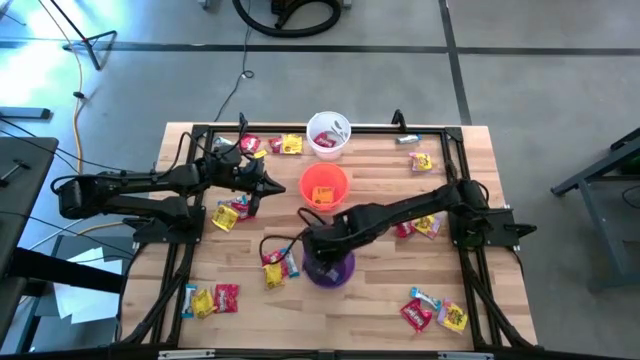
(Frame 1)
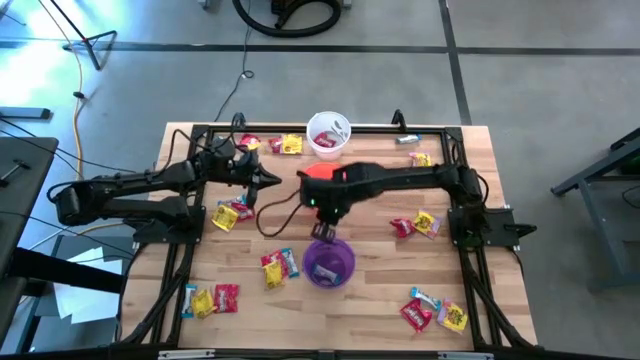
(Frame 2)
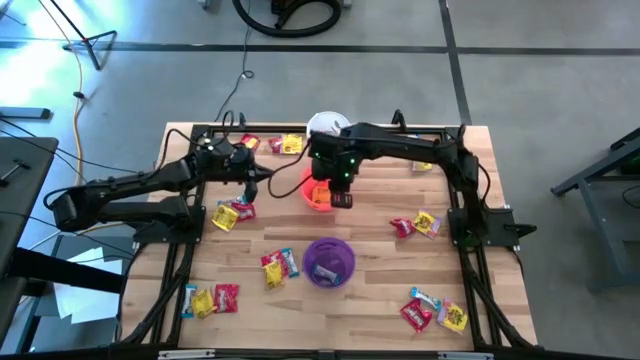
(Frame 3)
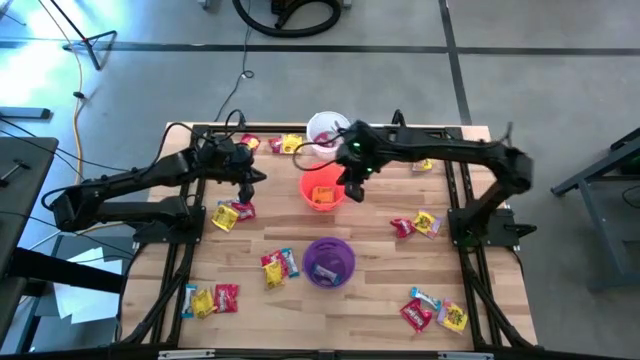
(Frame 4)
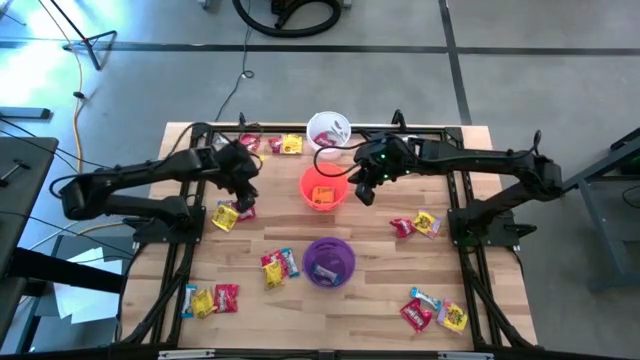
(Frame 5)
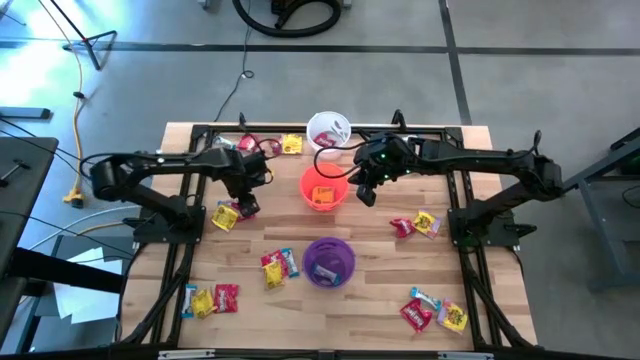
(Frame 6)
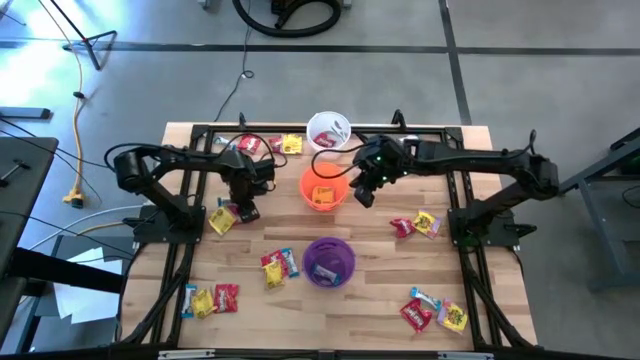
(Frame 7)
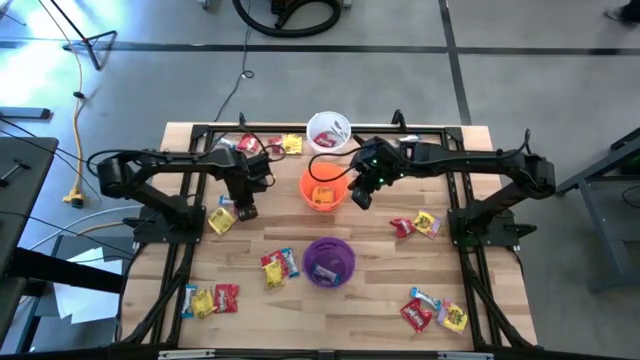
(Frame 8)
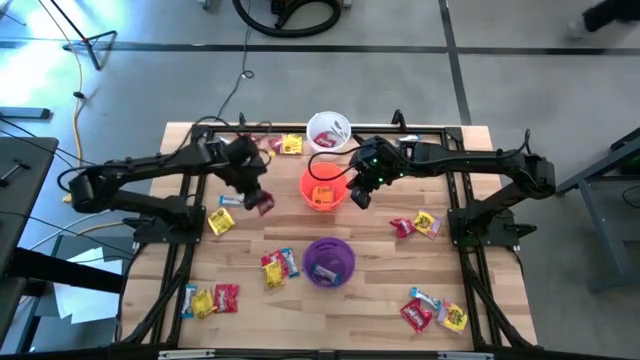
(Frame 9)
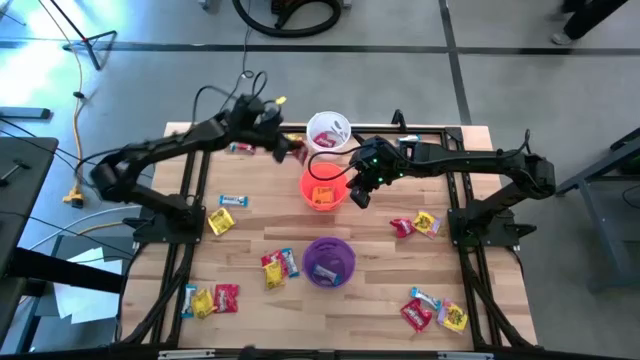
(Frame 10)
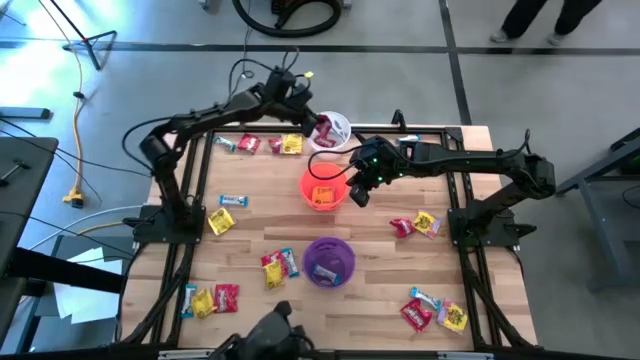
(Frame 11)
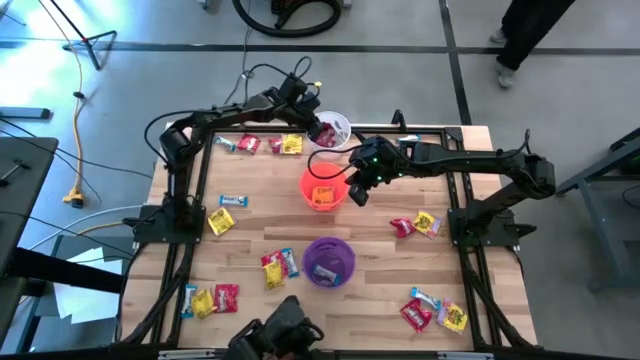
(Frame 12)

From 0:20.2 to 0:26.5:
Task: Sort candy
Put the red candy into the white bucket

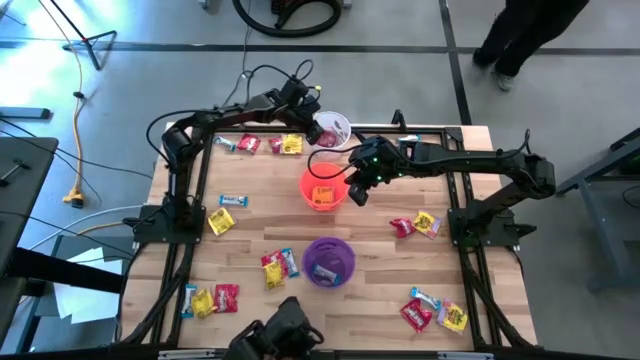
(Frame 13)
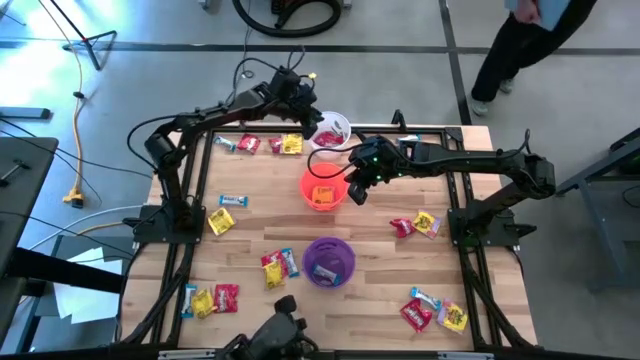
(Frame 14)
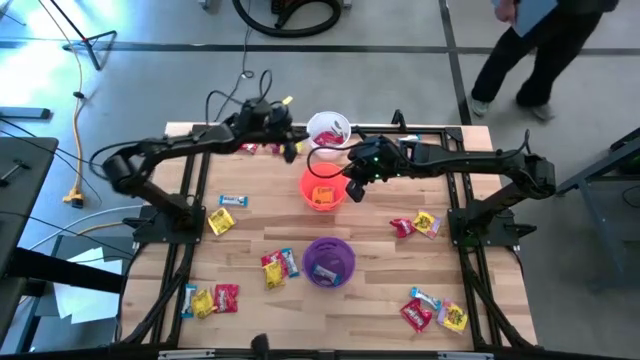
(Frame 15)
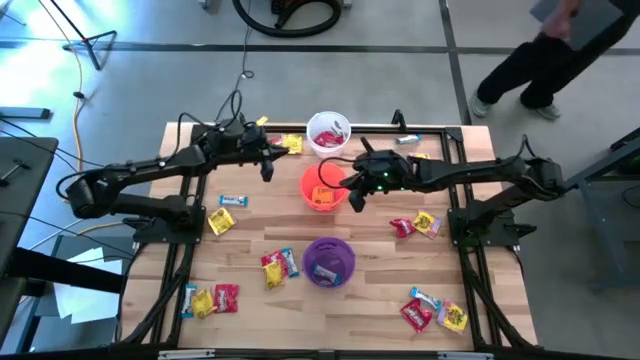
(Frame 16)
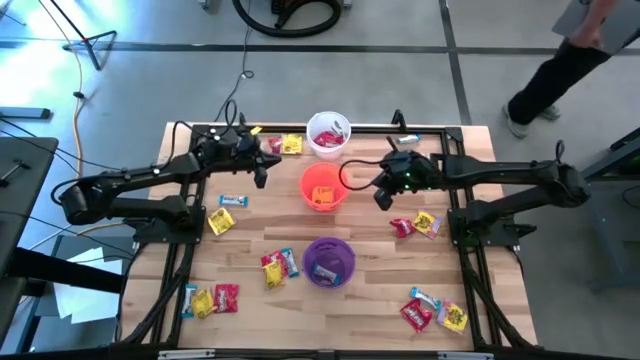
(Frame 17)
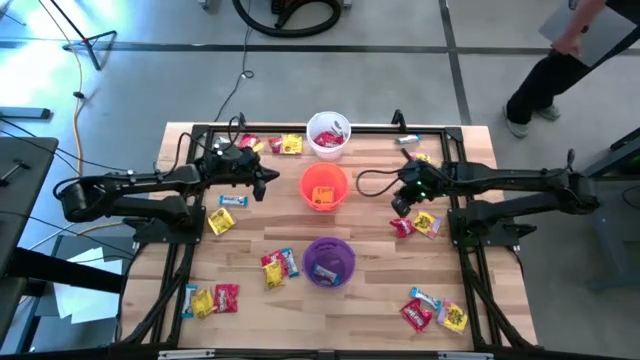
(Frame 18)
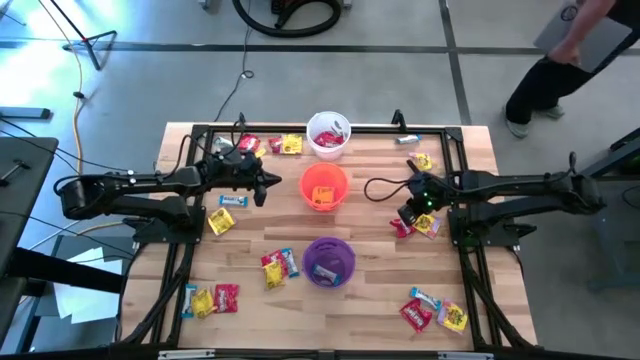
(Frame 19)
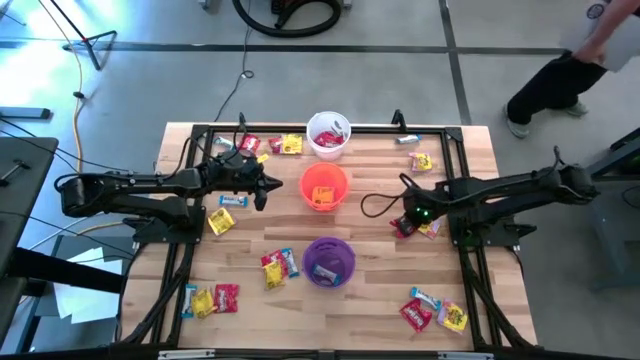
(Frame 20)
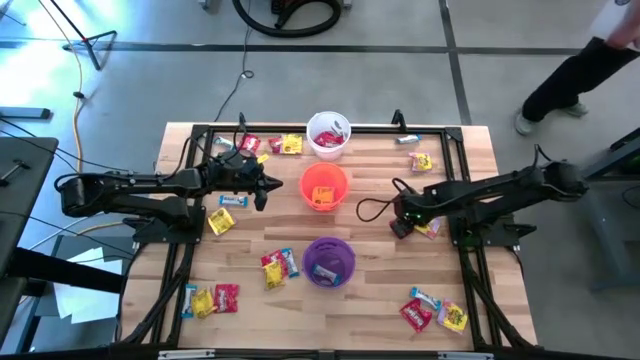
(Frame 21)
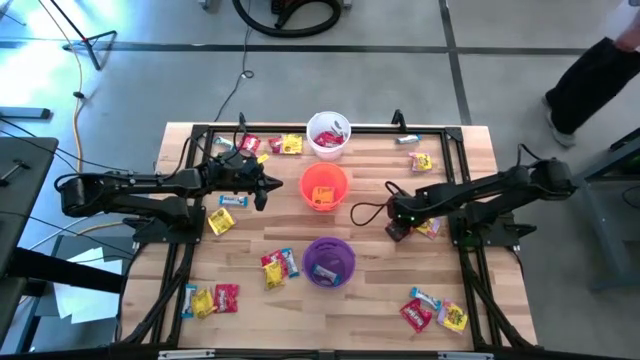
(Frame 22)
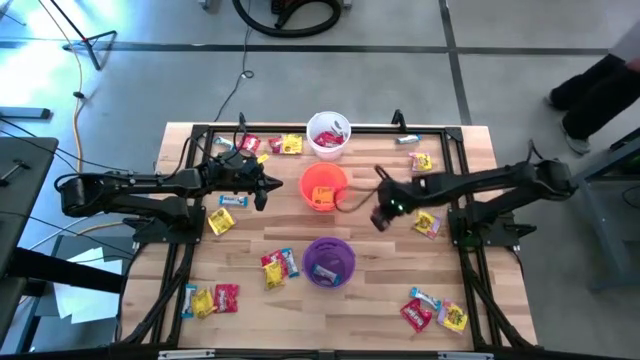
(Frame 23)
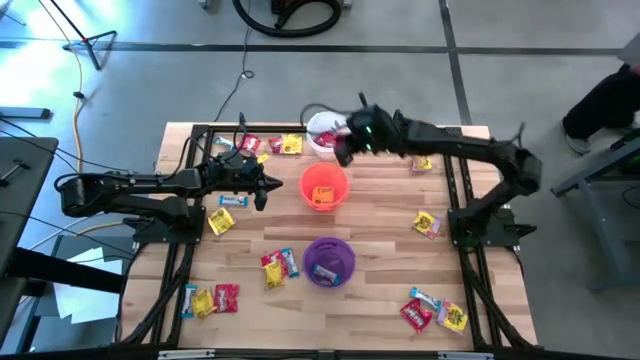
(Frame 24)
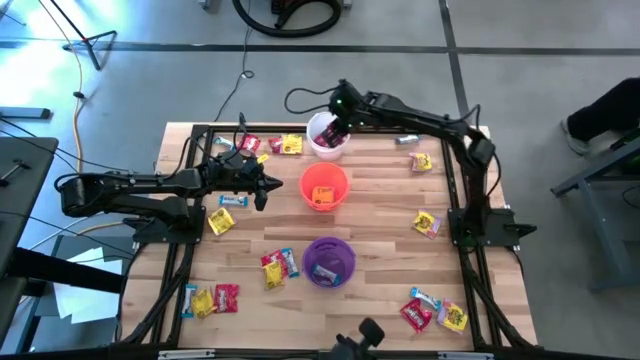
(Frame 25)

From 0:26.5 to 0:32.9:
Put the red candy into the white bucket

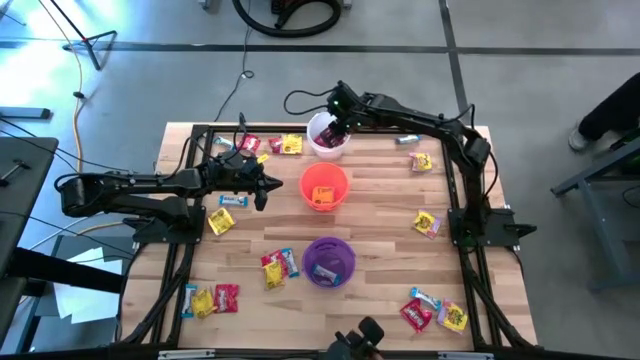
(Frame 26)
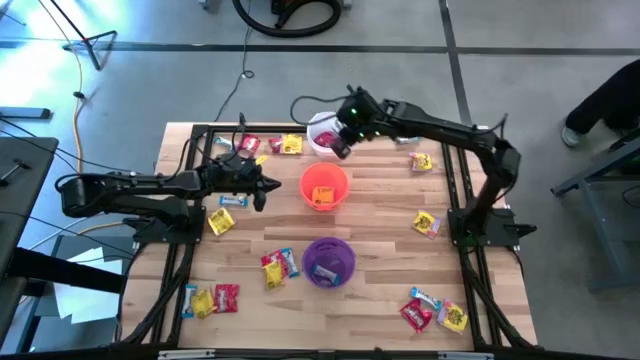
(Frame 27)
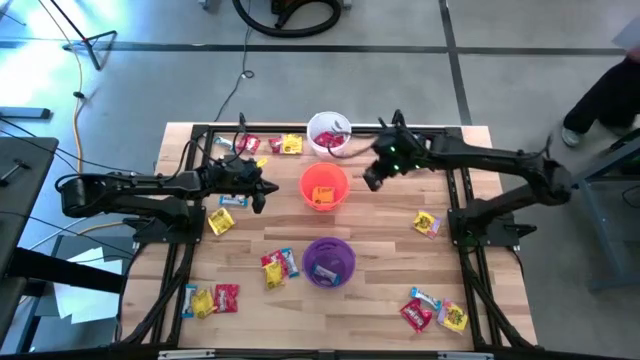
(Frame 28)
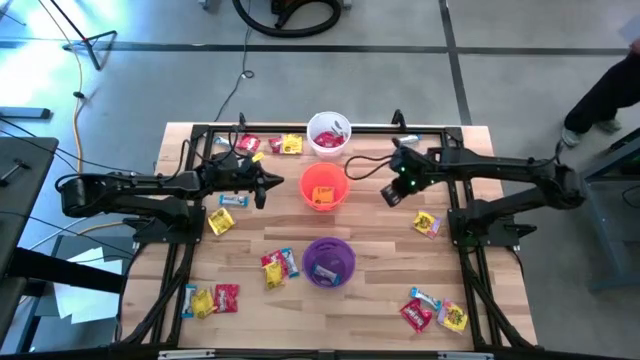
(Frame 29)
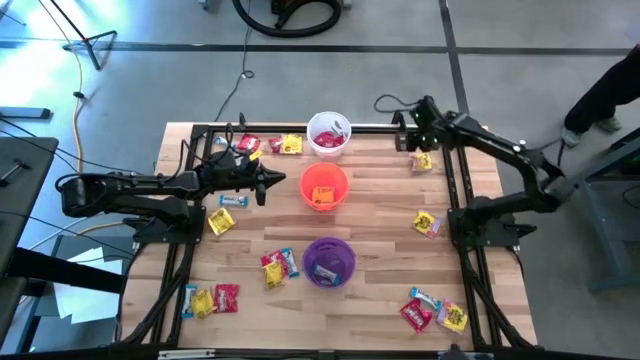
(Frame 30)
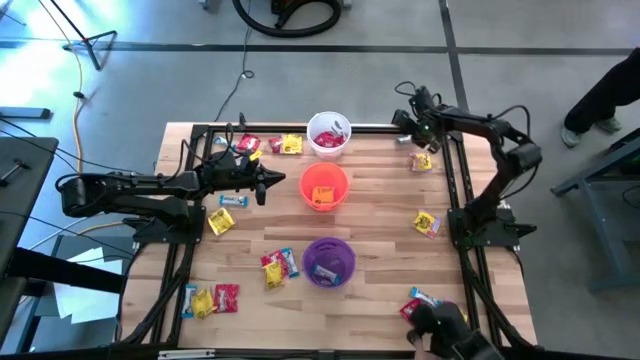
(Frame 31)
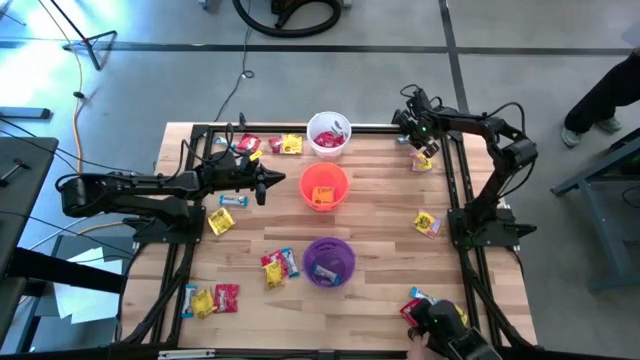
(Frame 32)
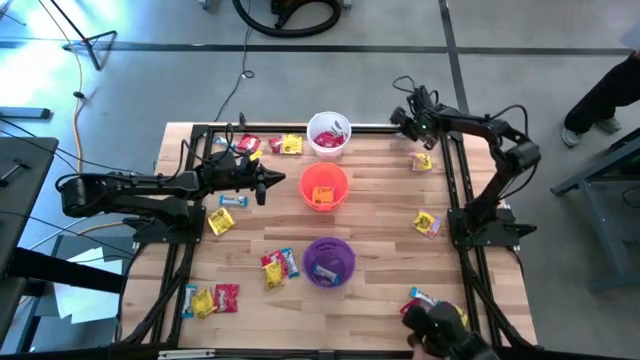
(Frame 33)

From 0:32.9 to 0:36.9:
Put the white chocolate into the violet bucket

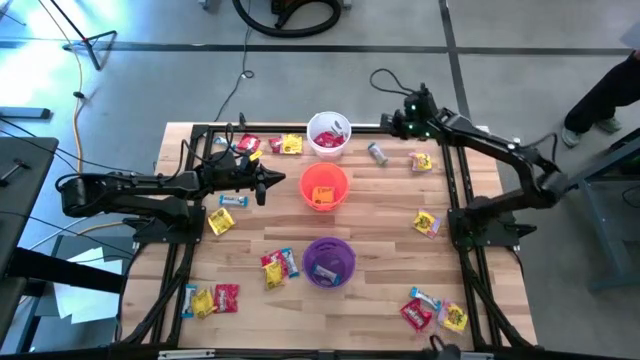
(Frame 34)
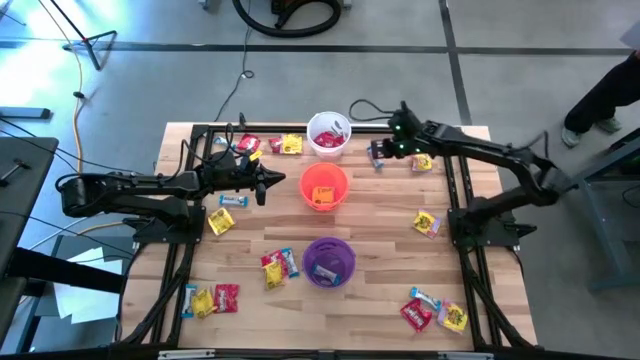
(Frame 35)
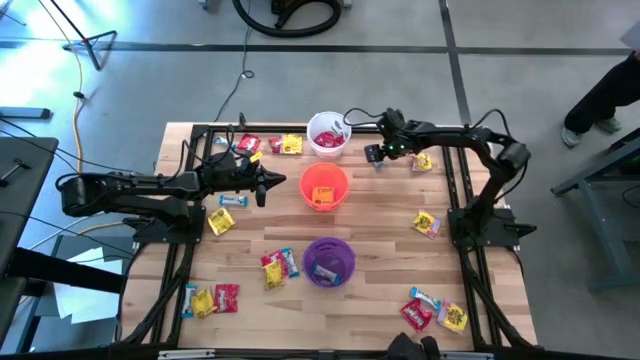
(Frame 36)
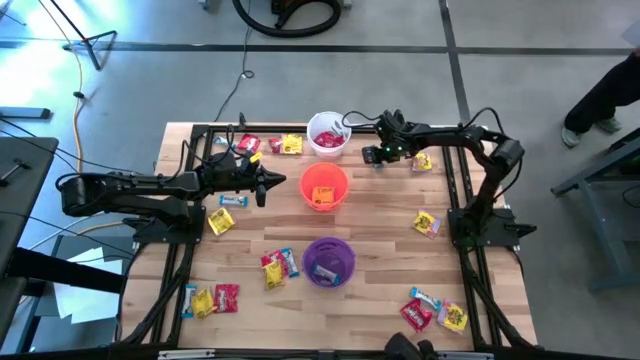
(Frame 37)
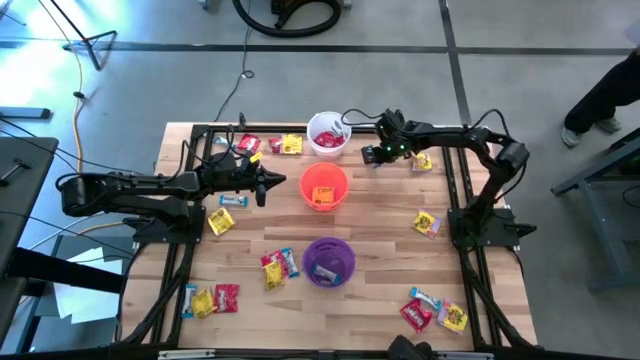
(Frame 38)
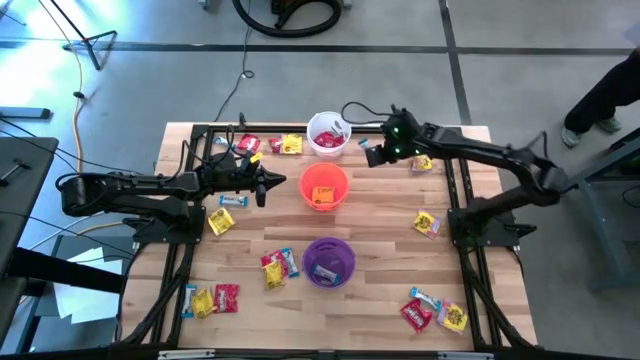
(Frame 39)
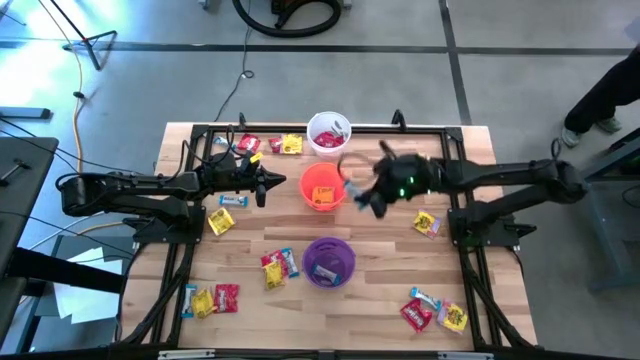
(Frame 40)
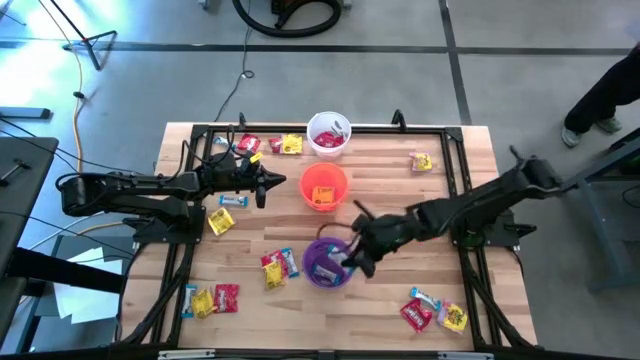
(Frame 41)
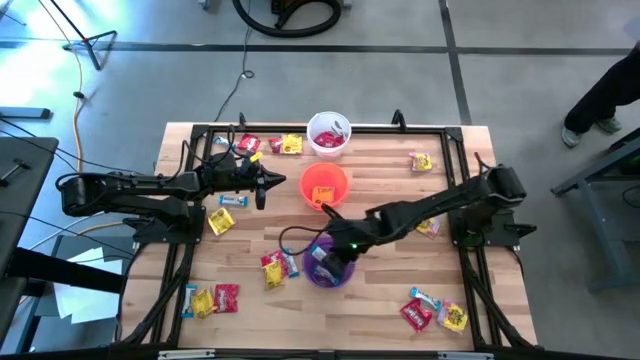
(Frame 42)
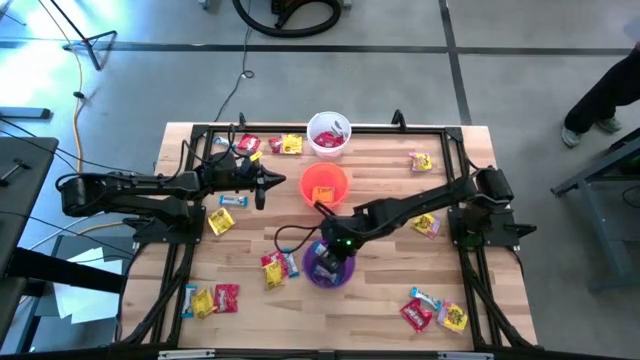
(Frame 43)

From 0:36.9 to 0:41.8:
Put the white chocolate into the violet bucket
